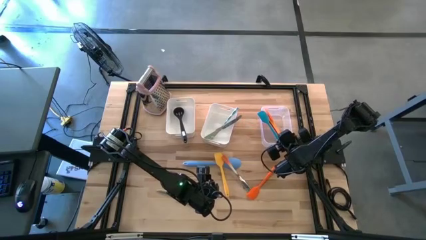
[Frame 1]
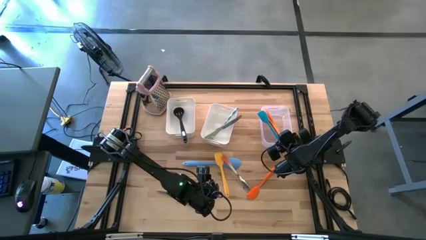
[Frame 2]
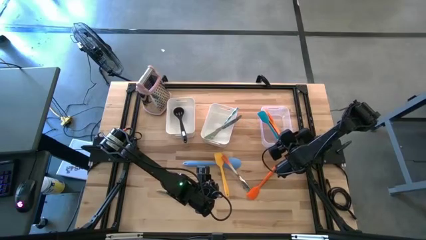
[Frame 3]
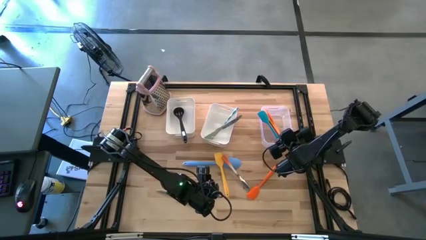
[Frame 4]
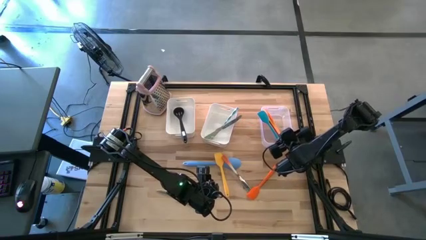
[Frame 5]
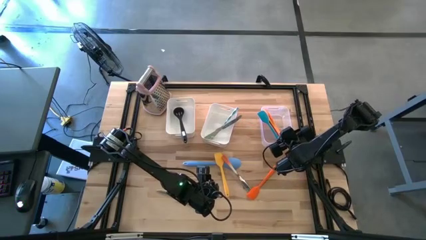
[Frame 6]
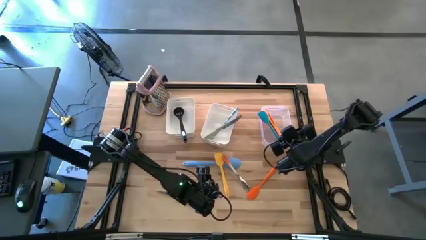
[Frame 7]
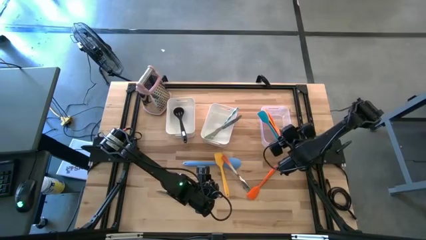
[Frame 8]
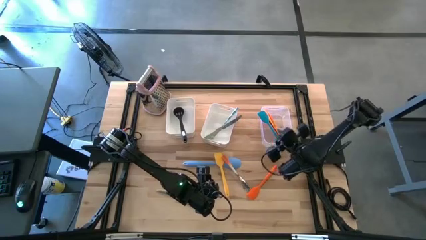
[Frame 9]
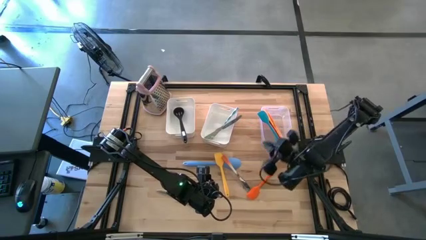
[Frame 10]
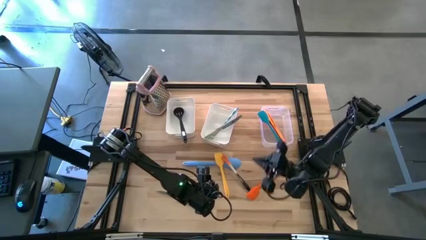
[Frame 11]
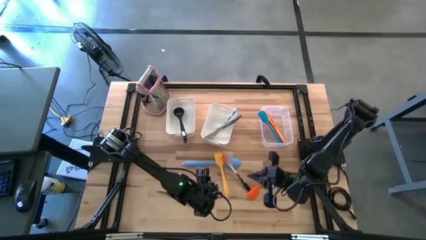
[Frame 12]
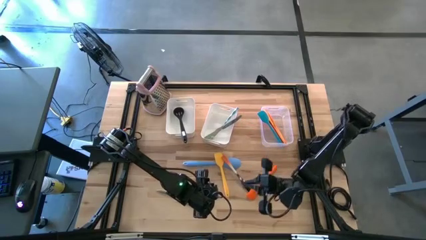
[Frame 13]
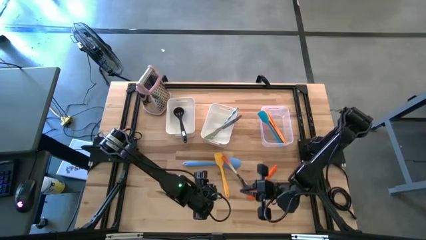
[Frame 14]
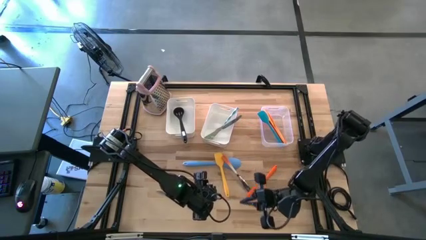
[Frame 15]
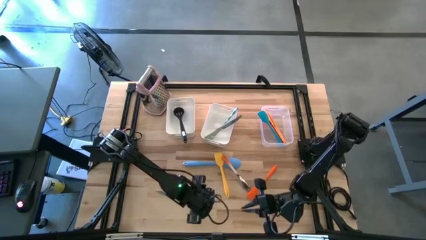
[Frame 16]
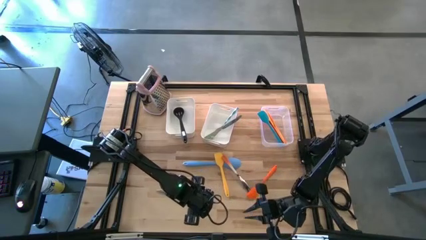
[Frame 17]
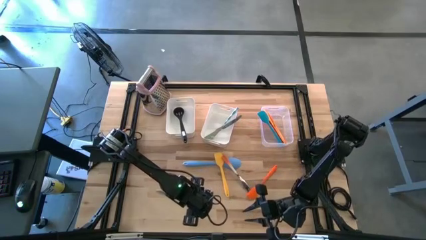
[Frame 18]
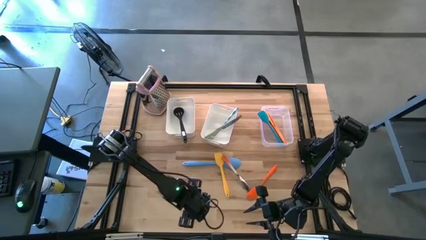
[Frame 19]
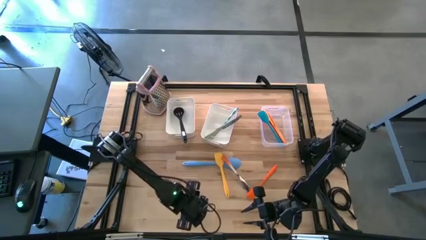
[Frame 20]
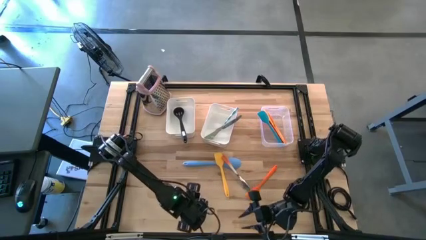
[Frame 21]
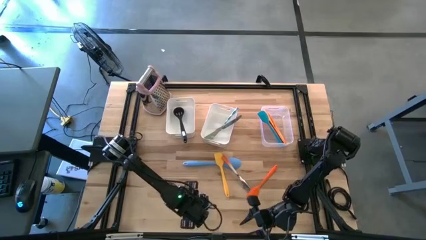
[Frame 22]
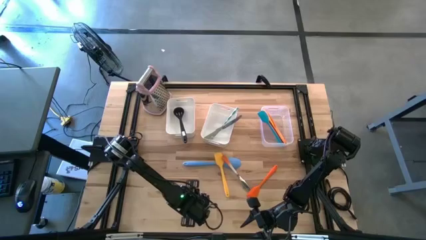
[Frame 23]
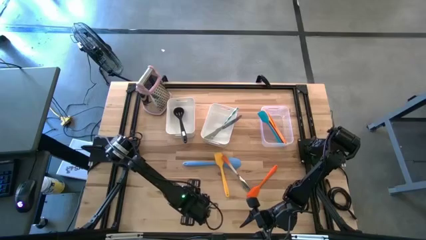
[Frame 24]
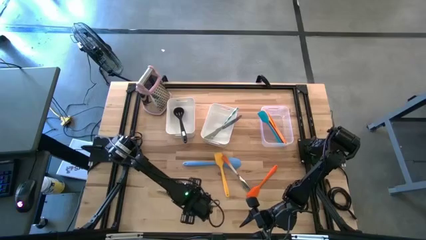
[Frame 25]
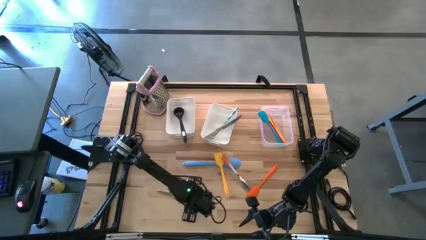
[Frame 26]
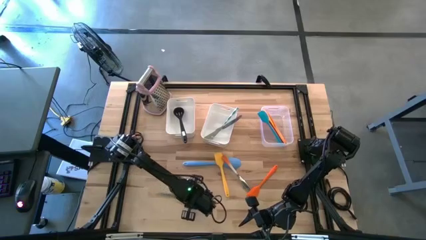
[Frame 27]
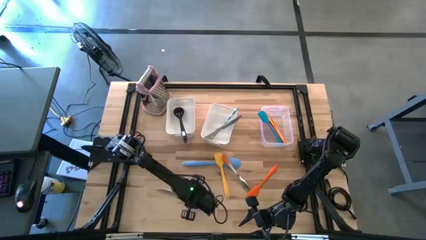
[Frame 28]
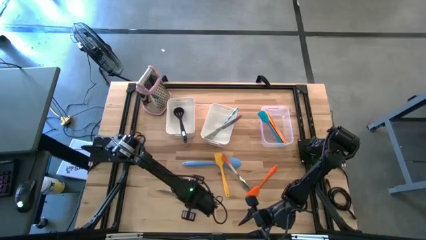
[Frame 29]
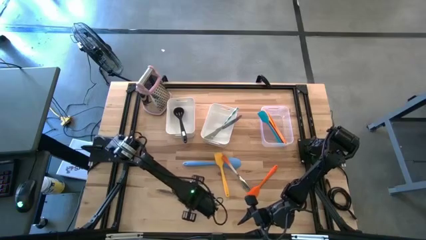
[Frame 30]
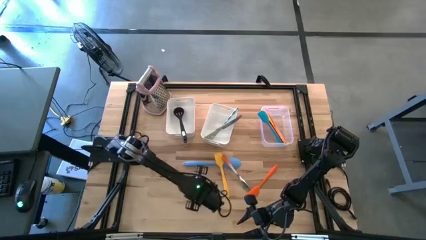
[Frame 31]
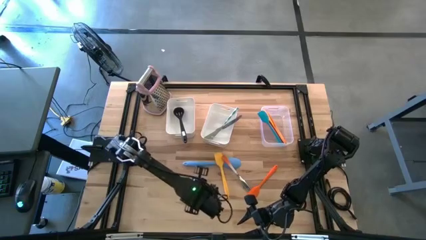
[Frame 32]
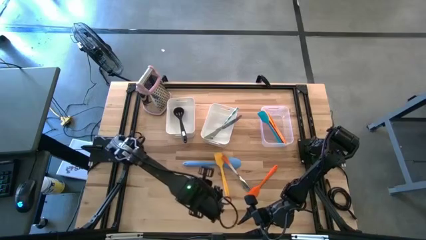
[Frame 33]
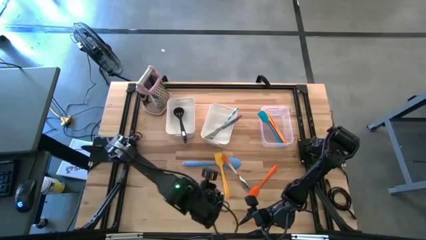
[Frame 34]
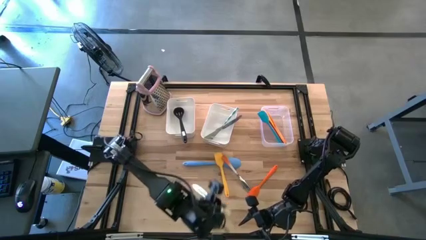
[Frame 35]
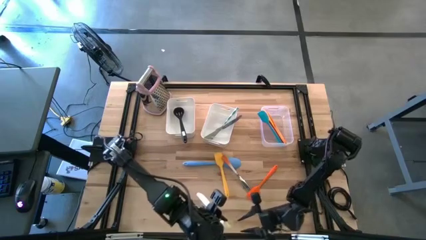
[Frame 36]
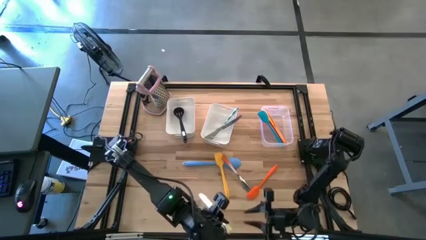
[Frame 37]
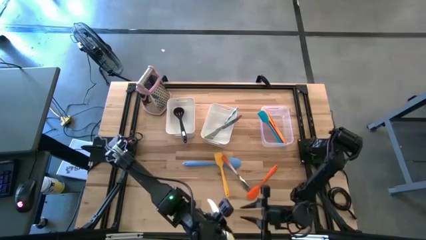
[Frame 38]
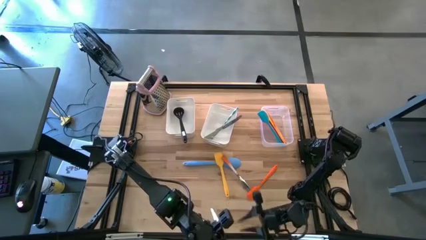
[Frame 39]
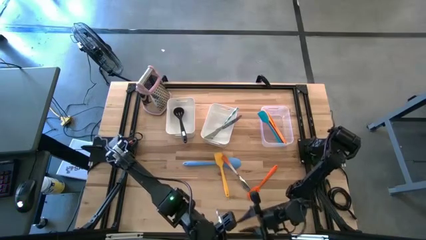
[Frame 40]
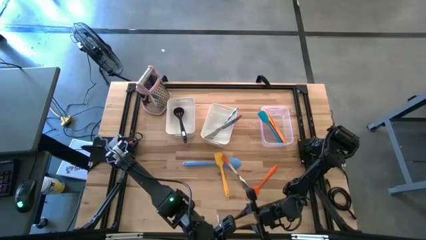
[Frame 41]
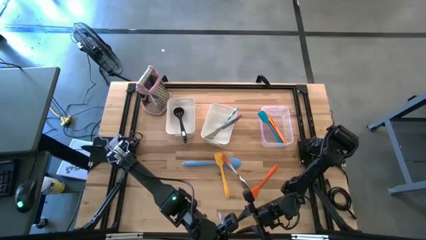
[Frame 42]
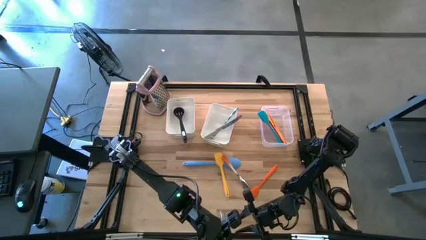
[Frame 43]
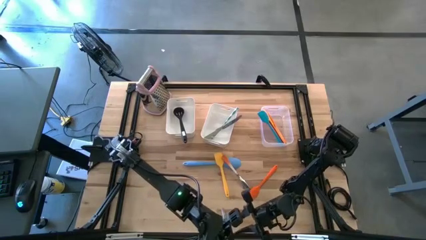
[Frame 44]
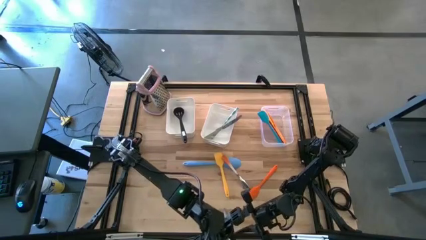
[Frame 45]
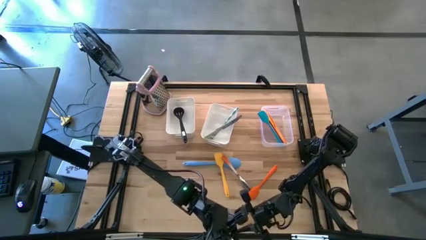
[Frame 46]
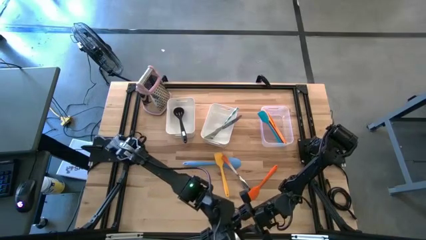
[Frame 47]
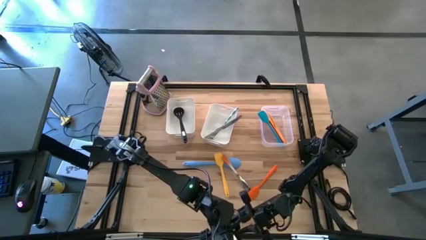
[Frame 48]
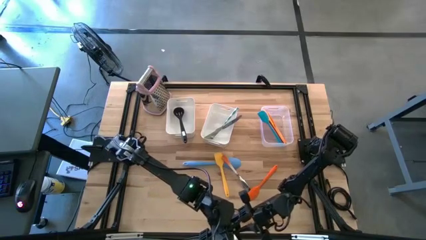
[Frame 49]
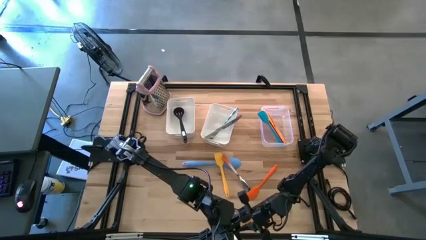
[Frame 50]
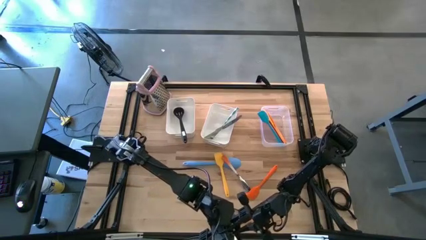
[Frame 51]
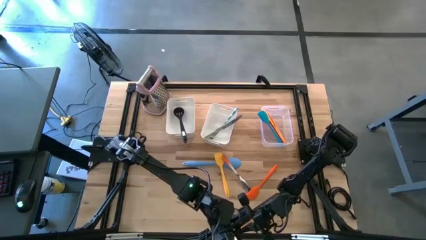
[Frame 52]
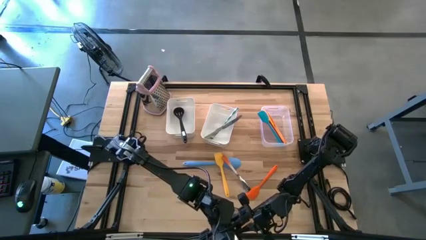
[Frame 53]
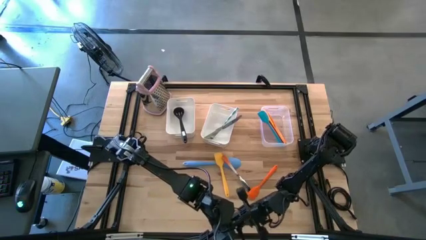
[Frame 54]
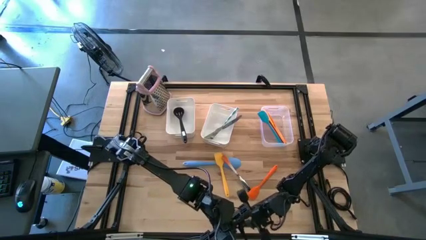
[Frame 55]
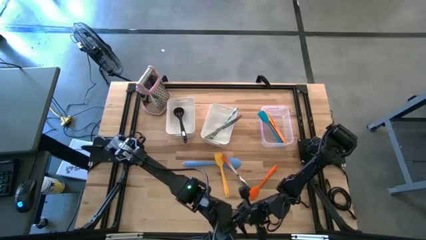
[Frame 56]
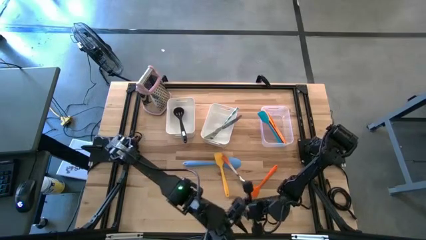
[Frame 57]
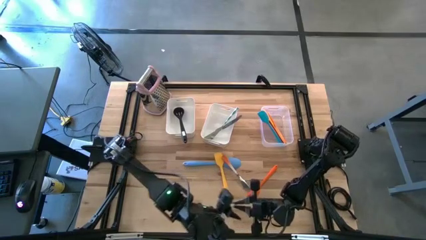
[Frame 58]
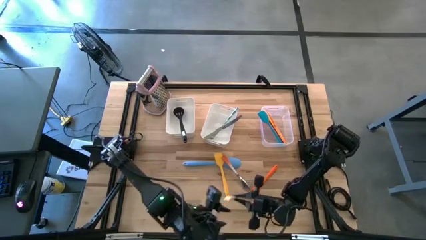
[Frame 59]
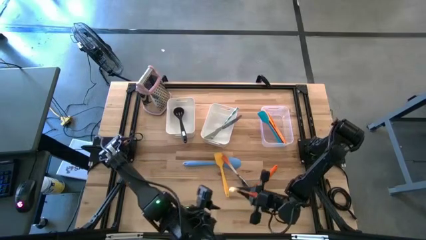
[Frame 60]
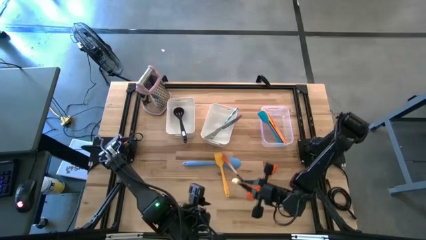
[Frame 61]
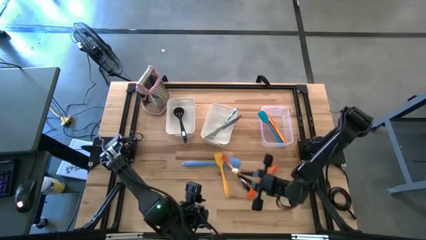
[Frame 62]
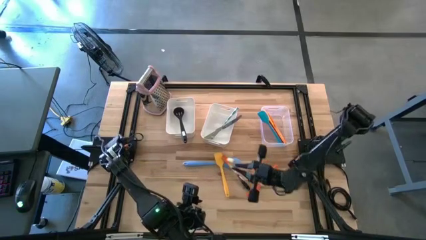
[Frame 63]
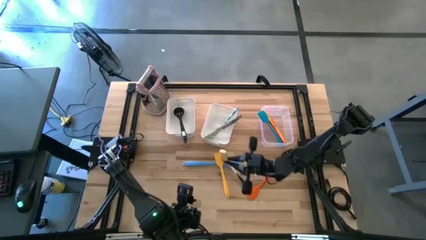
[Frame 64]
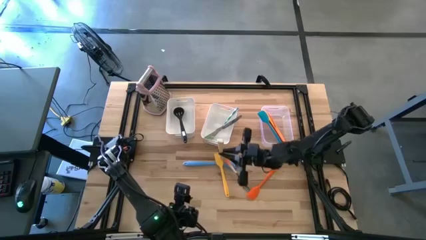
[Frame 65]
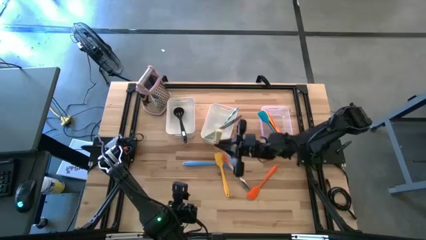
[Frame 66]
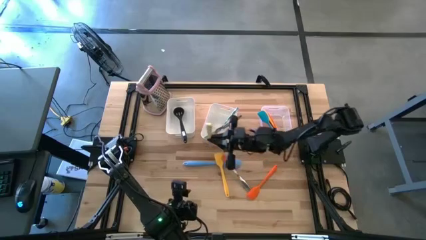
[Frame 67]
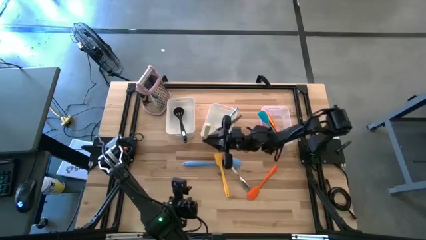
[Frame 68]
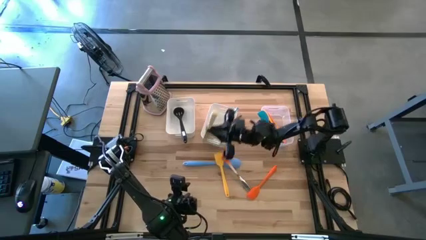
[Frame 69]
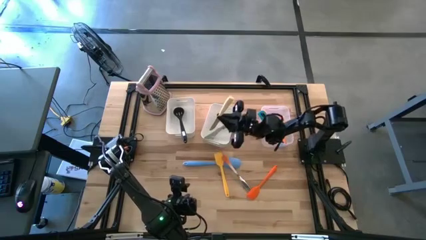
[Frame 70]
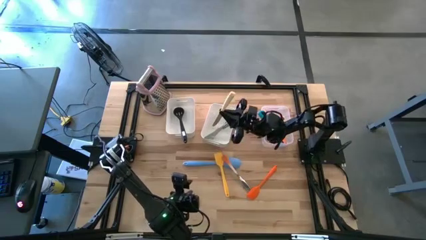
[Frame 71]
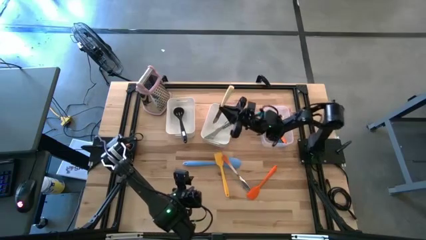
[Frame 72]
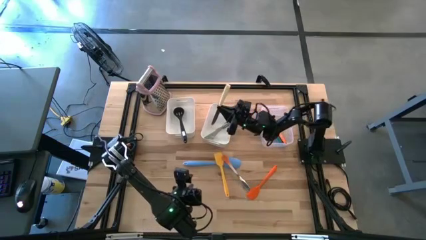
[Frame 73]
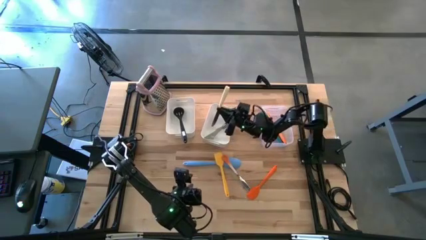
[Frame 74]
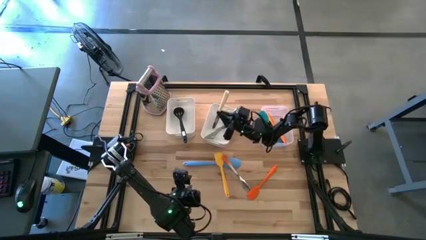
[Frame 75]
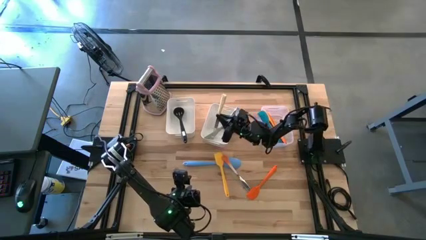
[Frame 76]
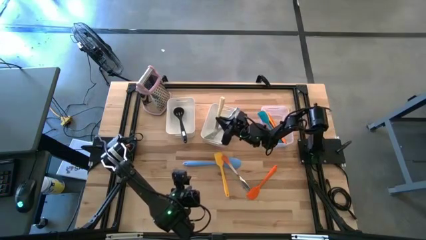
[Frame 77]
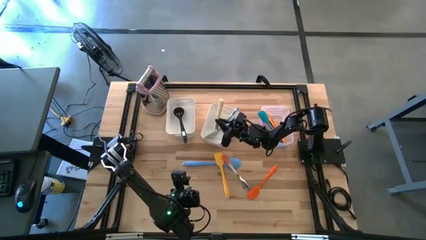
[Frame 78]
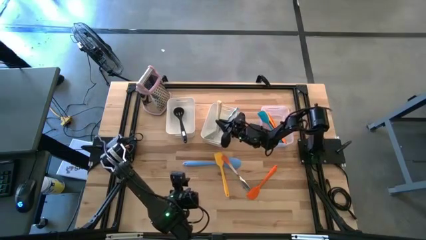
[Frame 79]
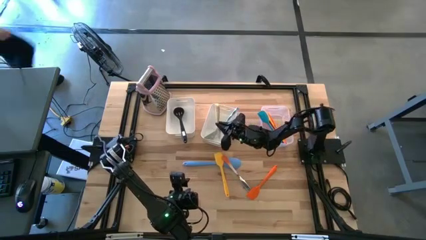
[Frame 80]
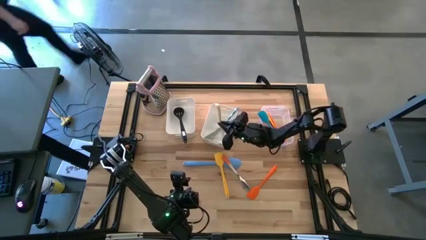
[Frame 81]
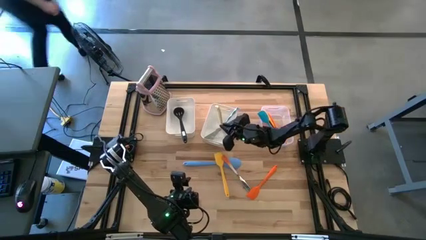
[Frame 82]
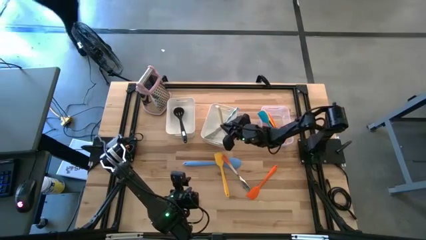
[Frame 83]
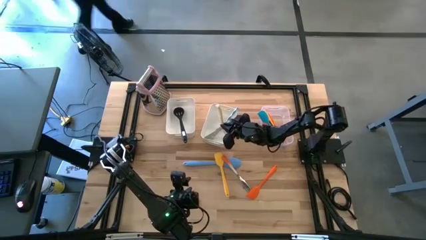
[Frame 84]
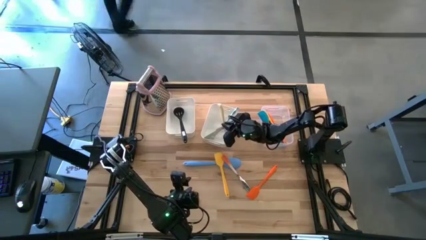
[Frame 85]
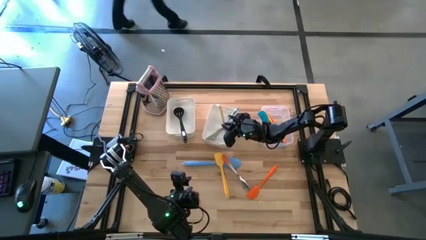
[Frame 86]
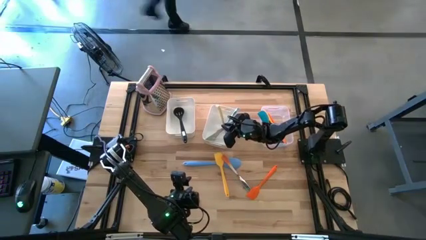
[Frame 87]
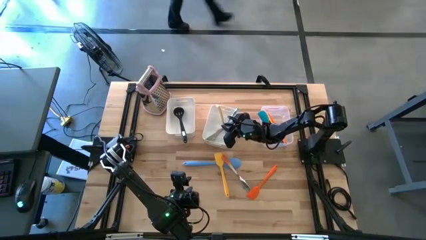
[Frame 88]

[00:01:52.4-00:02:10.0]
Task: Pick & Place Kitchen Items
Put the yellow table knife into the right white bin
